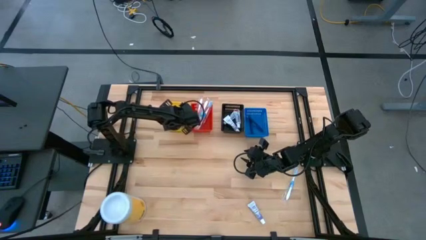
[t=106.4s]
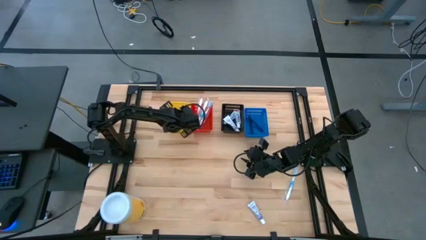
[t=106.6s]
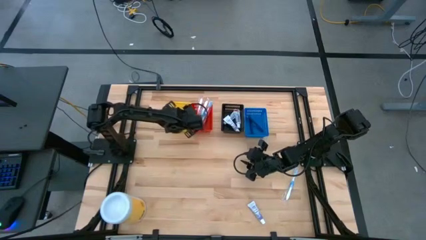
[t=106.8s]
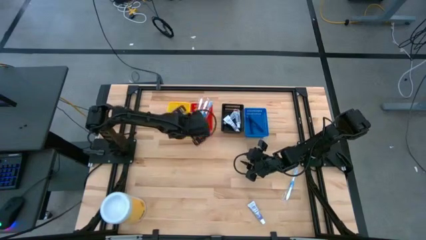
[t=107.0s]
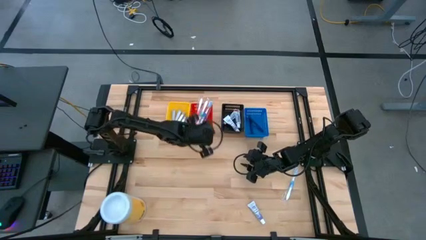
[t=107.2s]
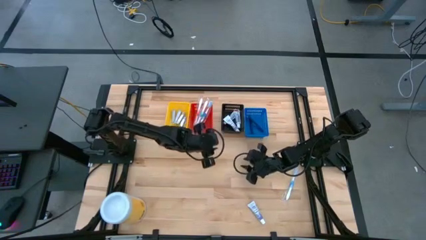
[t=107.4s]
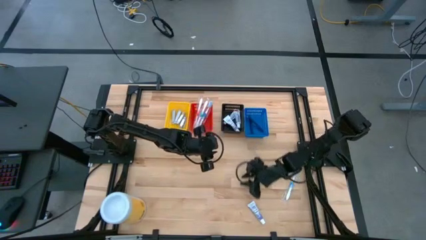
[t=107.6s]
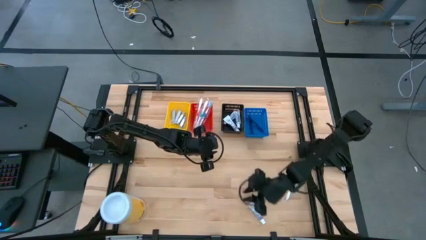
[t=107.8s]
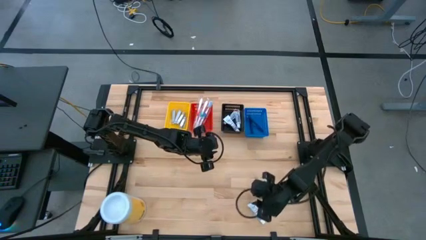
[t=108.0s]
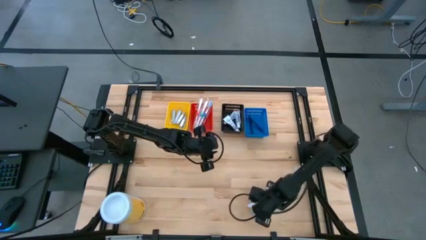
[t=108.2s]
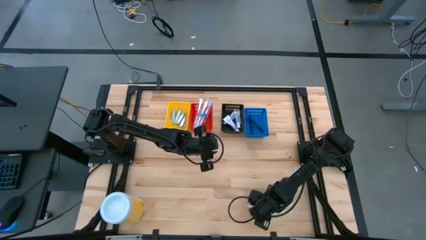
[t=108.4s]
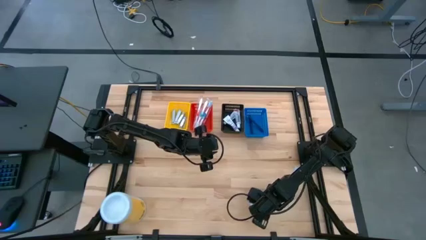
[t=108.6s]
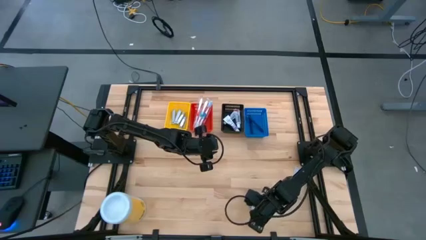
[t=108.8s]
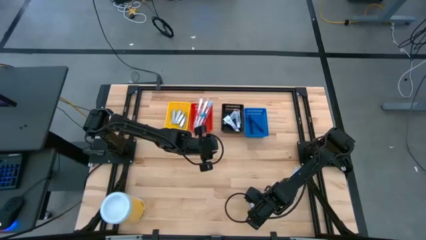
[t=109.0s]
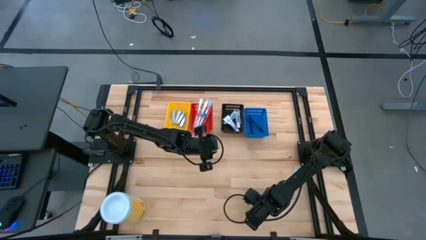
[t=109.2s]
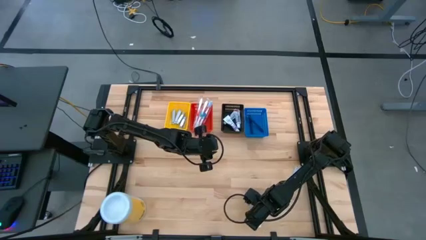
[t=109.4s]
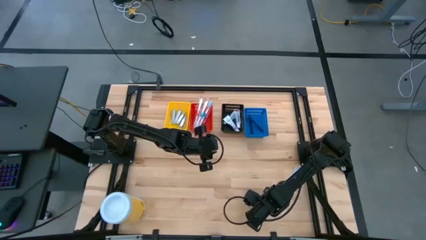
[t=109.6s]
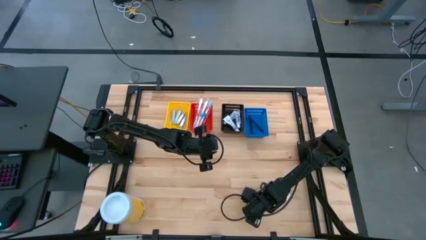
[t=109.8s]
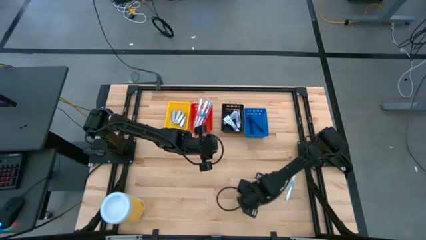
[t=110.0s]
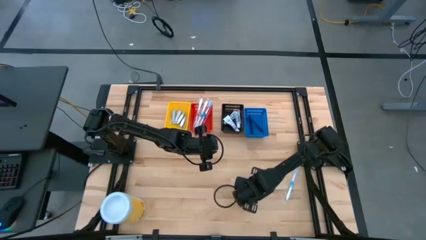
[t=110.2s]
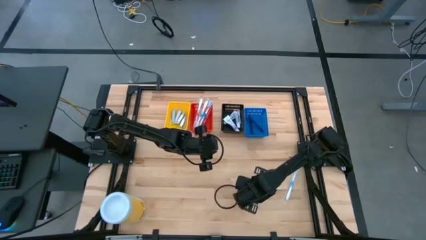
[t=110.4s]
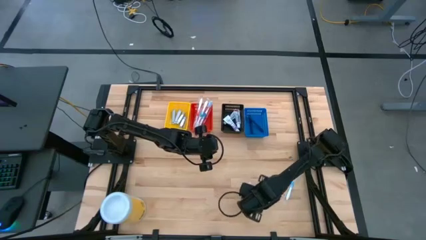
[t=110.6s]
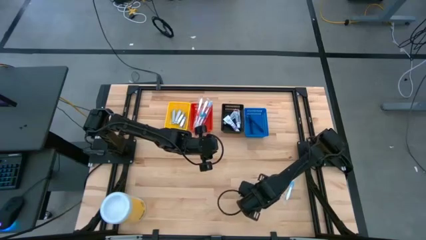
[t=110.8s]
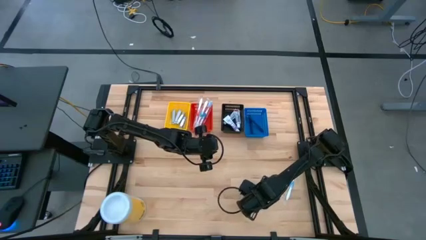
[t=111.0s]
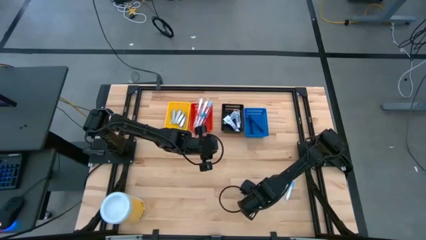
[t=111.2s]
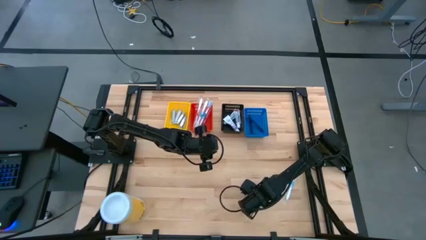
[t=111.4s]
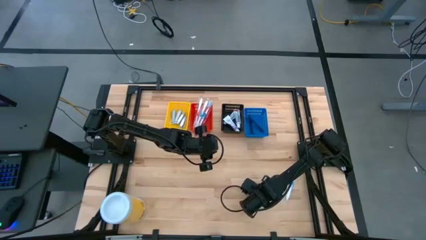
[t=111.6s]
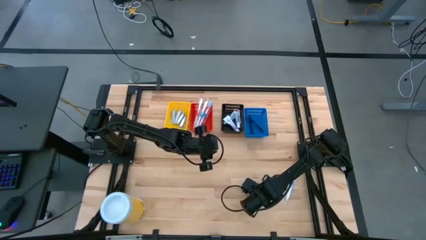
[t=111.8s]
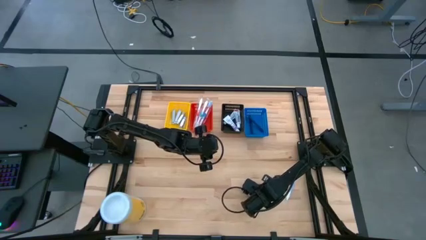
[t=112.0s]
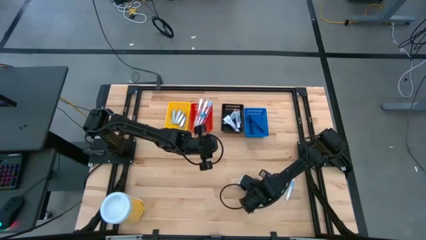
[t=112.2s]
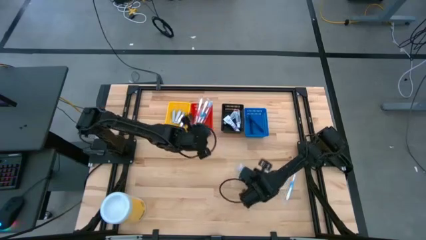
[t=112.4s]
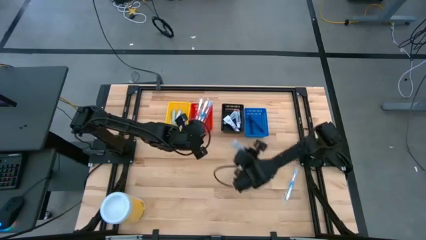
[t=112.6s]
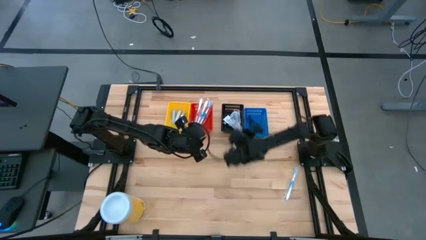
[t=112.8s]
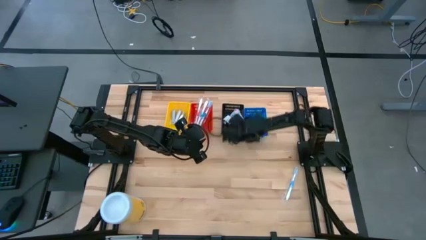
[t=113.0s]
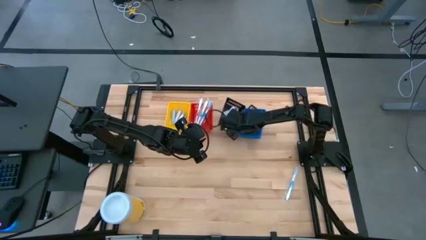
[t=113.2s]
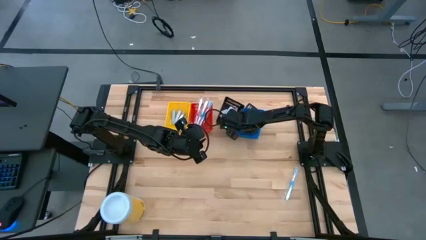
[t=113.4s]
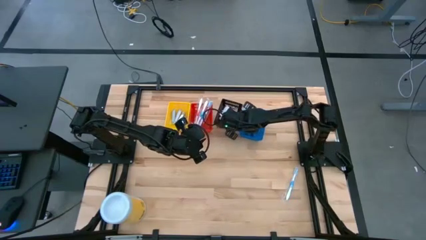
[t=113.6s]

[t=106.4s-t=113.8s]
Task: Pick & Place Travel size toiletries
Put the white toothpaste into the black bin

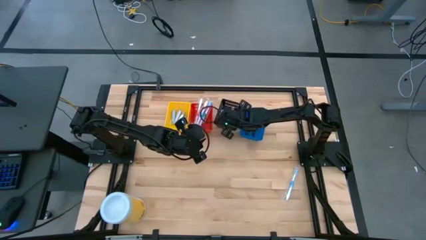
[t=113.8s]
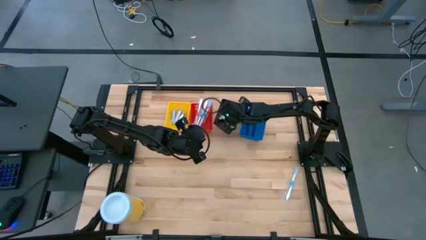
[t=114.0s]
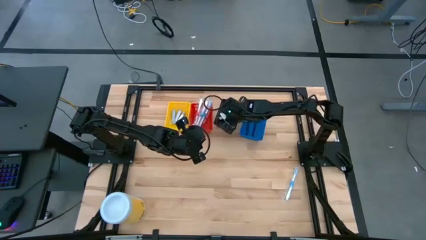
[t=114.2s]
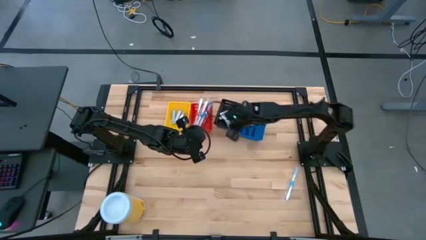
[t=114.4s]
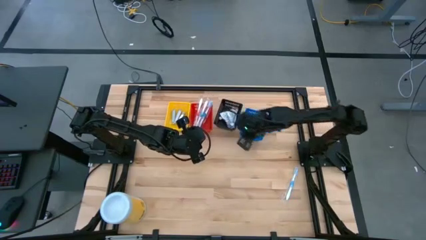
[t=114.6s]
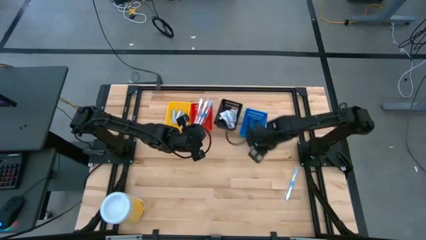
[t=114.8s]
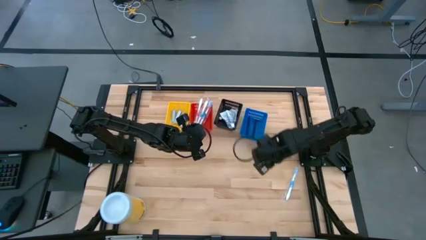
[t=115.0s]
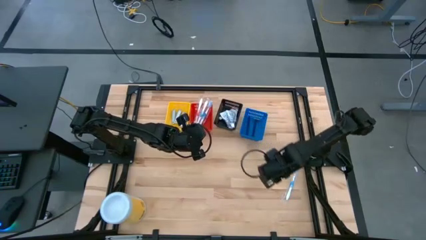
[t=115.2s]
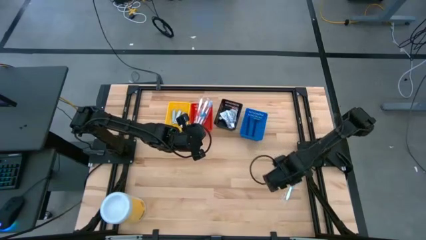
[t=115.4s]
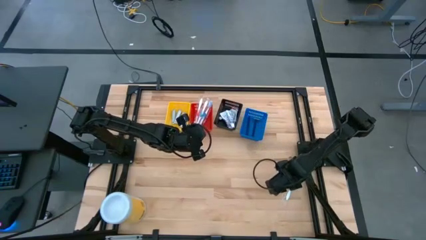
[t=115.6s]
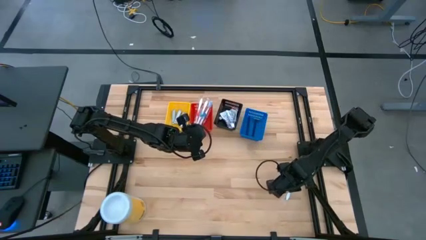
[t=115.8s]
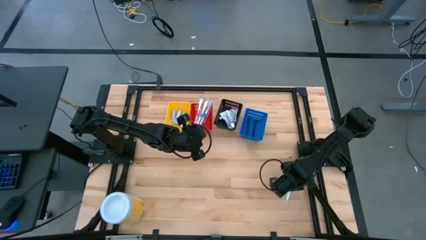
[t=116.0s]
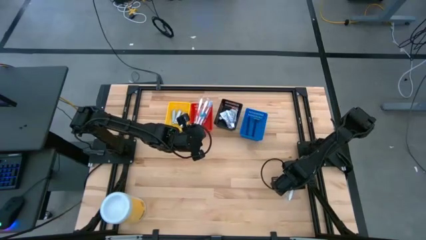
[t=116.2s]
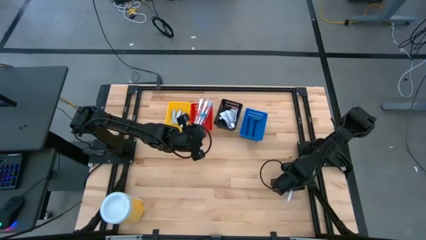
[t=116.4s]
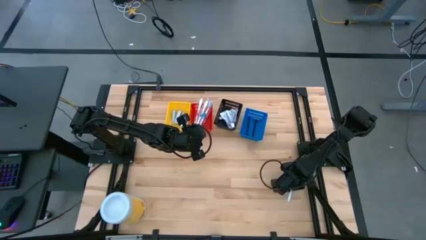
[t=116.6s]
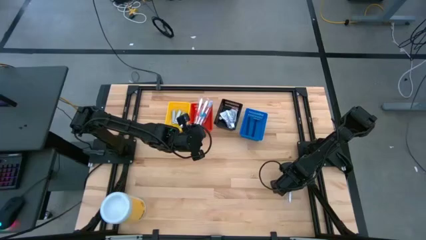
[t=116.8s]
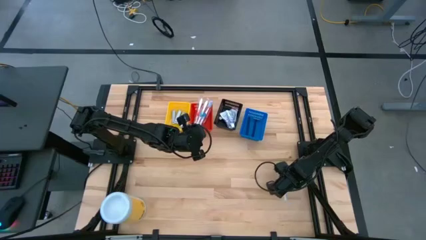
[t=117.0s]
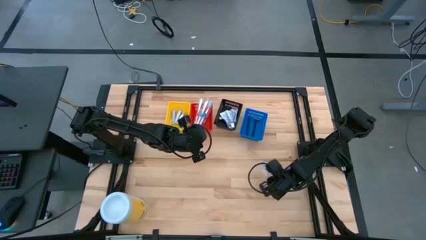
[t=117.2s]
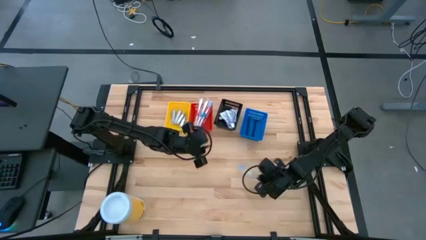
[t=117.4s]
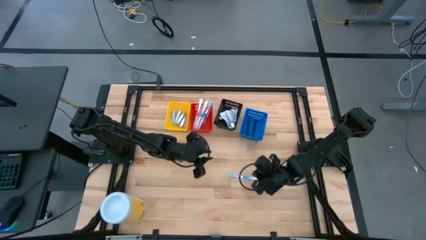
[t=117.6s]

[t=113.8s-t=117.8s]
Put the blue toothbrush into the red bin

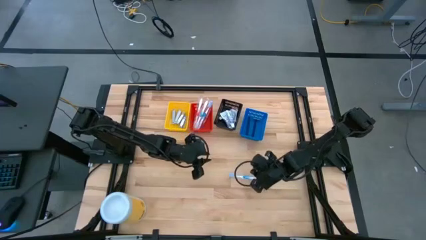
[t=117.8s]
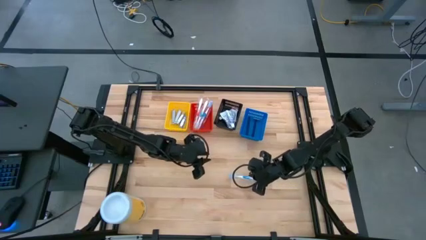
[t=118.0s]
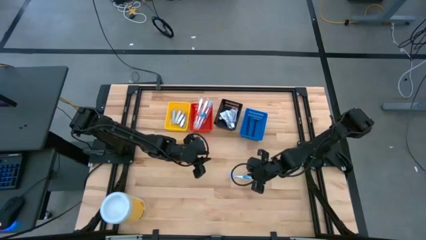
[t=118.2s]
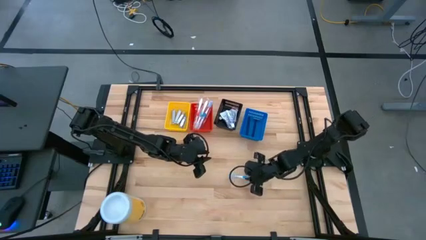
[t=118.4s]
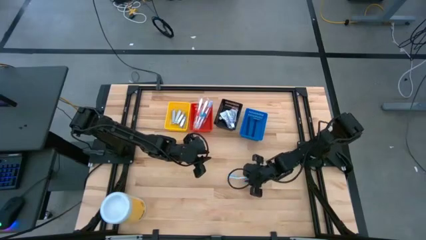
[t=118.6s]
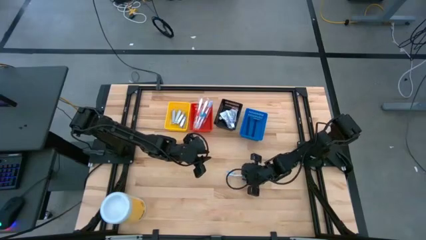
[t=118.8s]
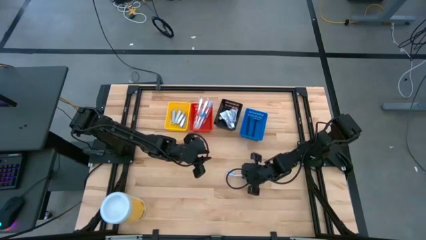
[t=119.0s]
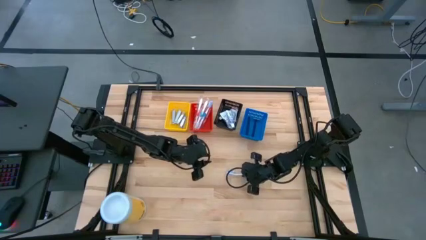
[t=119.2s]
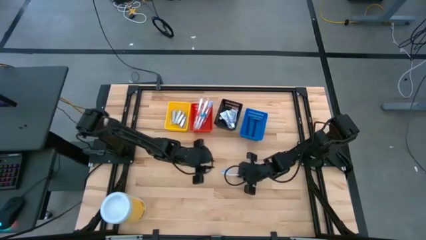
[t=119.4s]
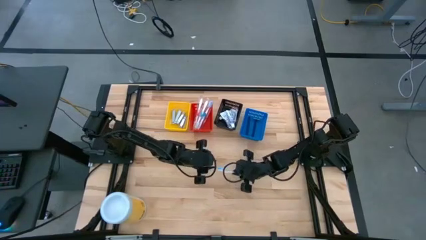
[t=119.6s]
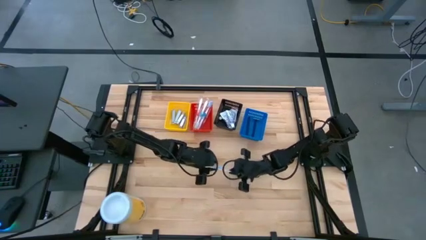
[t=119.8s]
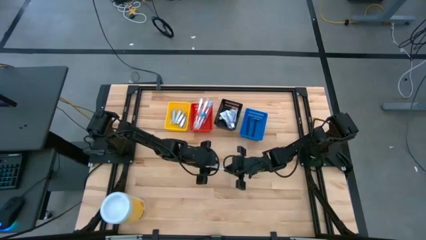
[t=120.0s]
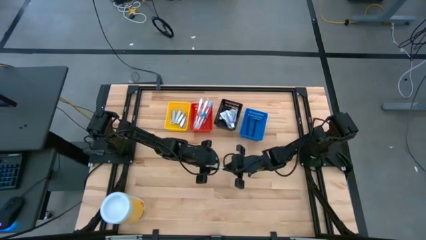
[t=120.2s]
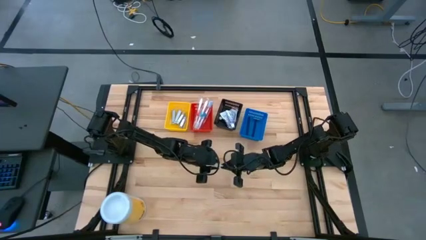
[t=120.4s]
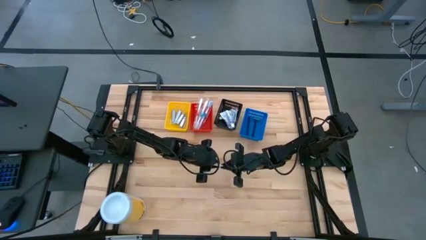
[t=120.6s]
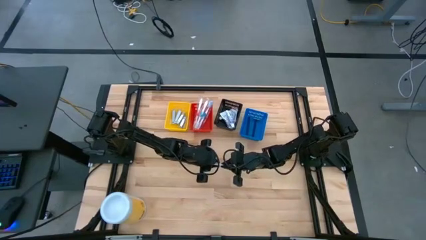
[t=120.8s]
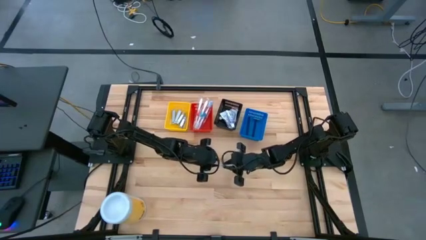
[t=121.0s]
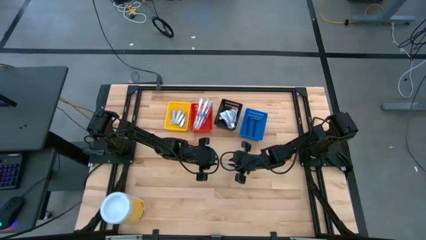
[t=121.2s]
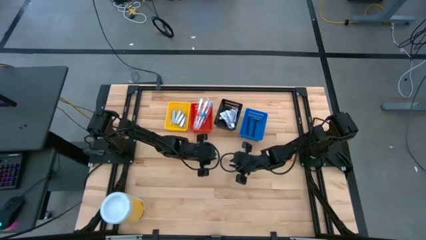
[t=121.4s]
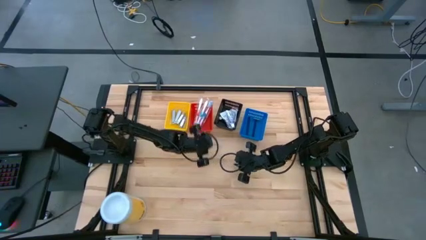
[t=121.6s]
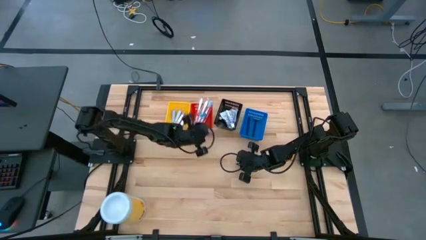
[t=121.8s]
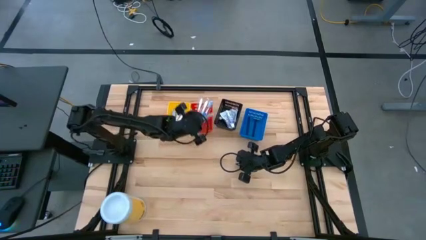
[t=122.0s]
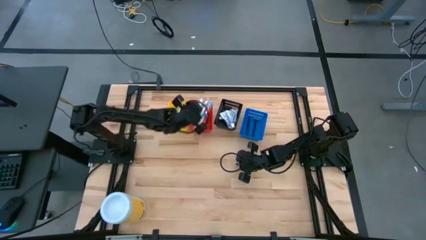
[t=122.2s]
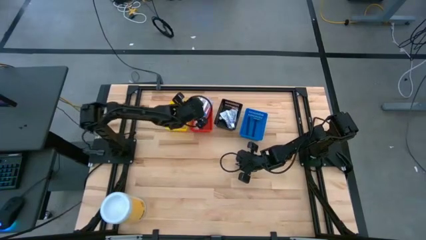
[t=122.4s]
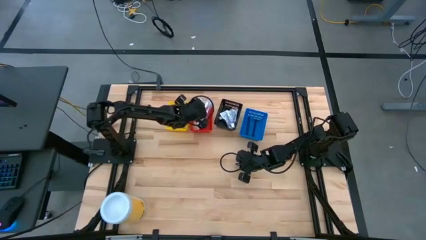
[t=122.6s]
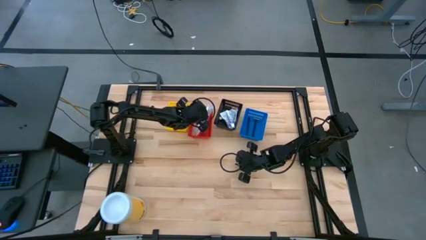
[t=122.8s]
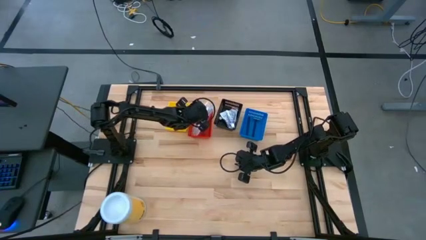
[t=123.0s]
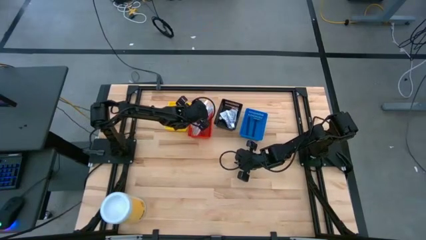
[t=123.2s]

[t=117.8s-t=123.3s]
Put the blue toothbrush into the red bin
